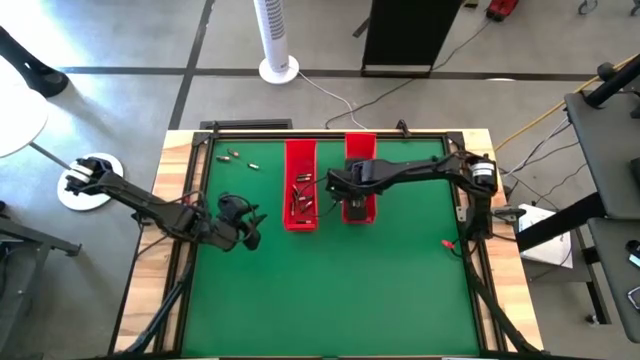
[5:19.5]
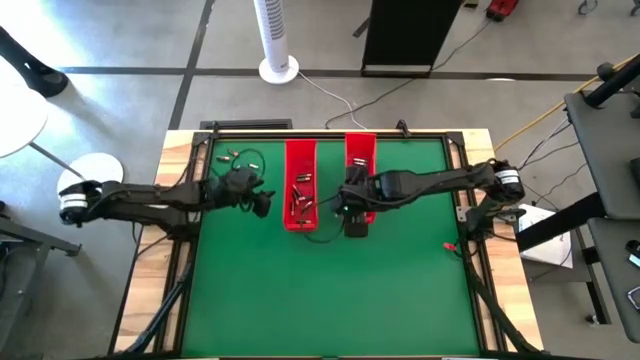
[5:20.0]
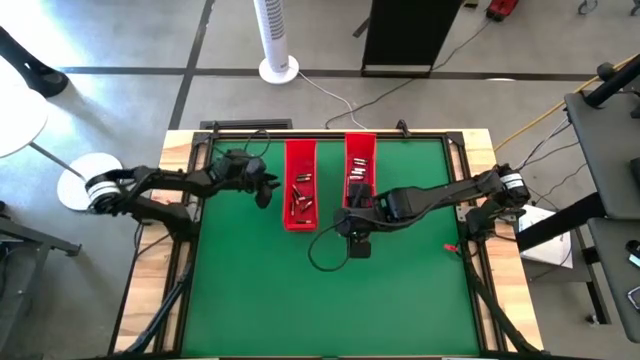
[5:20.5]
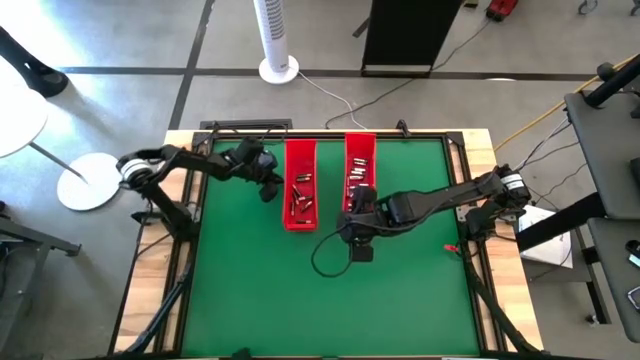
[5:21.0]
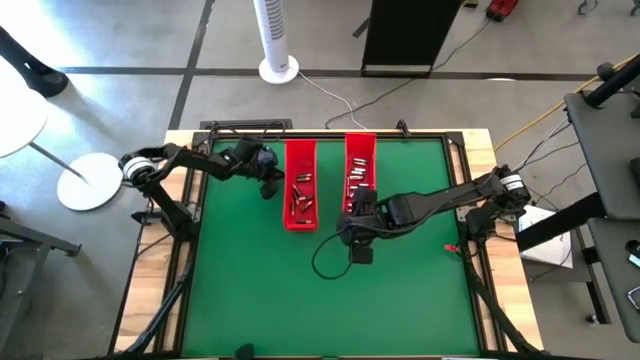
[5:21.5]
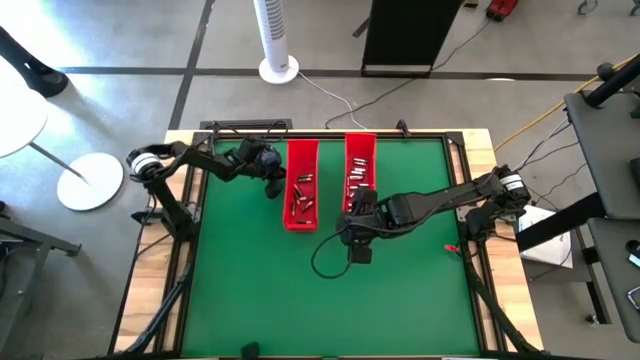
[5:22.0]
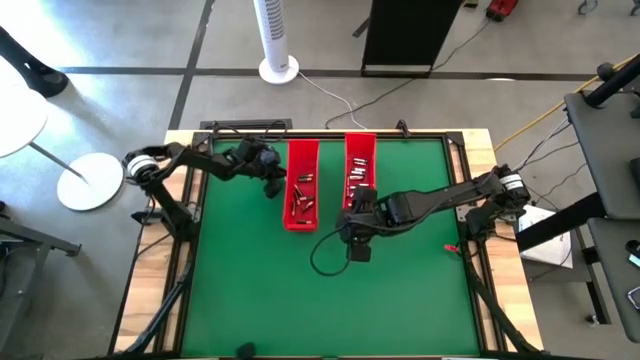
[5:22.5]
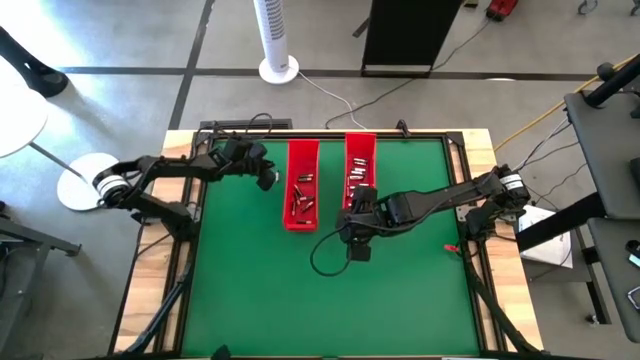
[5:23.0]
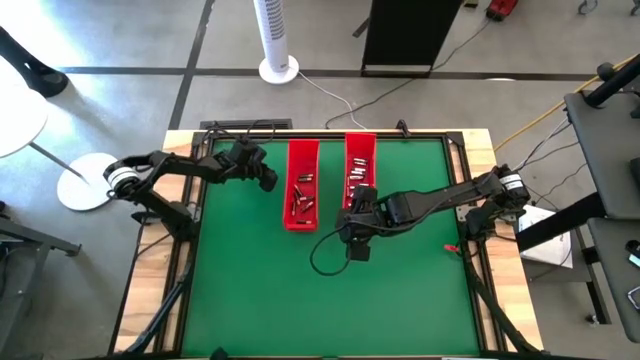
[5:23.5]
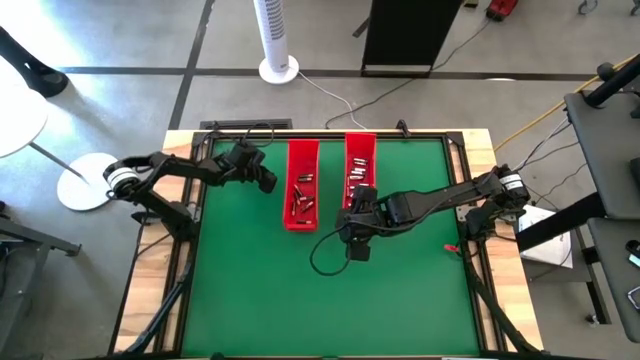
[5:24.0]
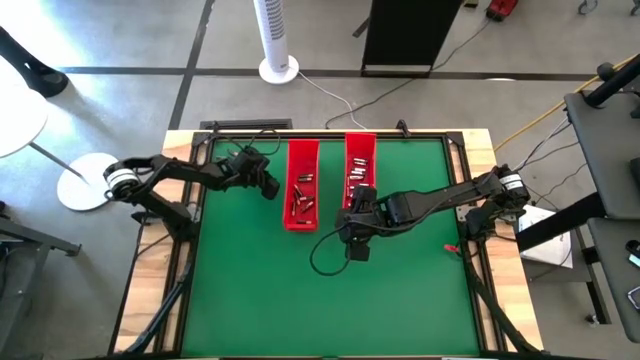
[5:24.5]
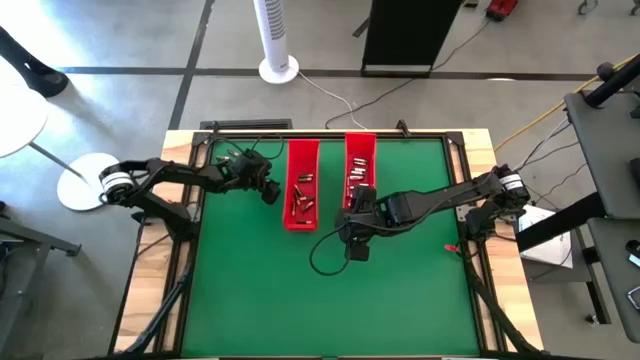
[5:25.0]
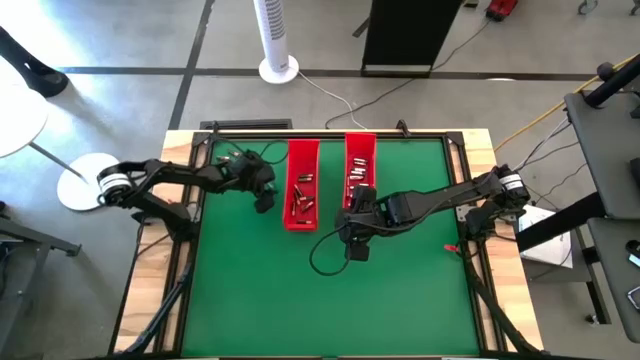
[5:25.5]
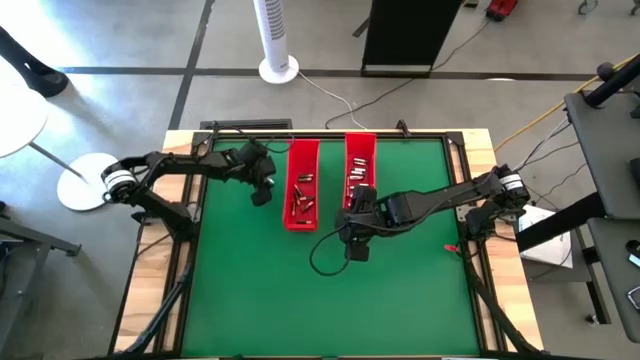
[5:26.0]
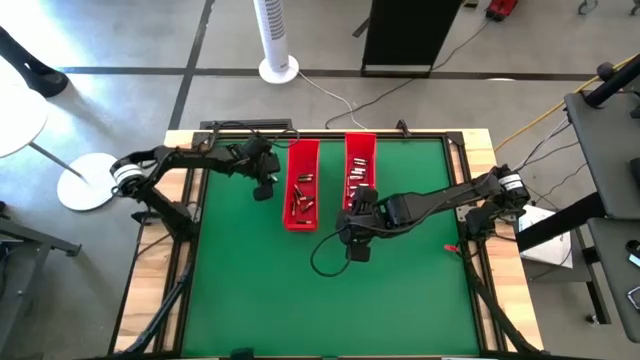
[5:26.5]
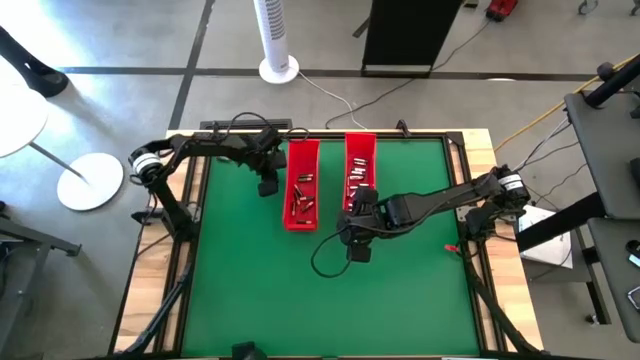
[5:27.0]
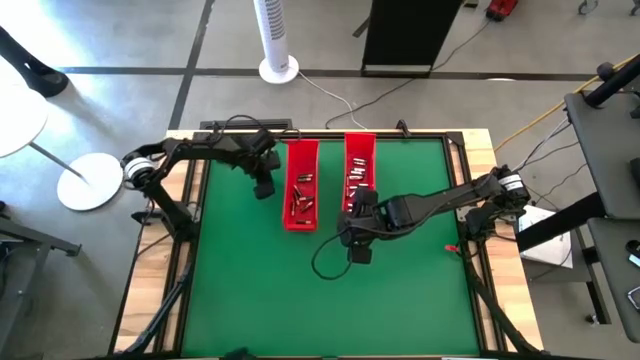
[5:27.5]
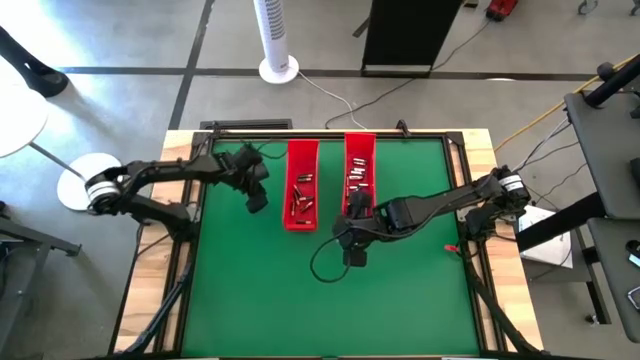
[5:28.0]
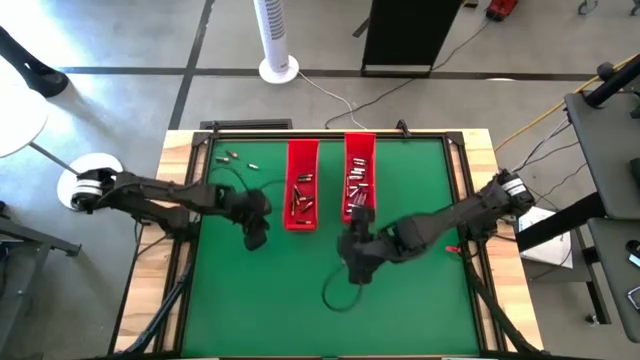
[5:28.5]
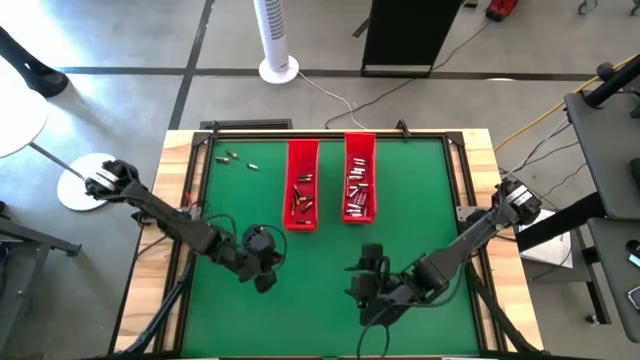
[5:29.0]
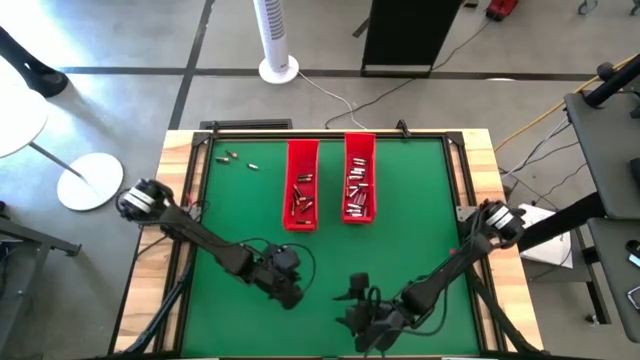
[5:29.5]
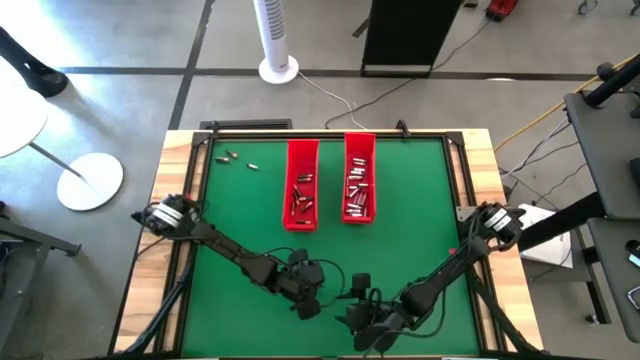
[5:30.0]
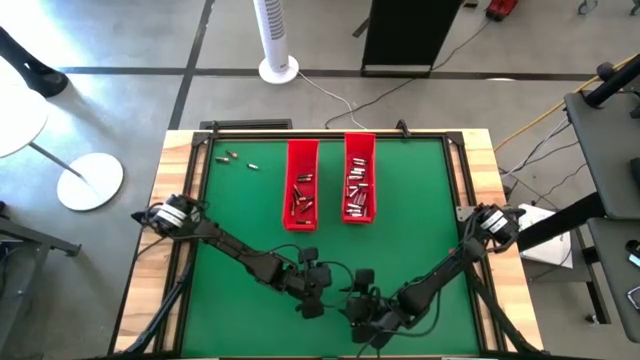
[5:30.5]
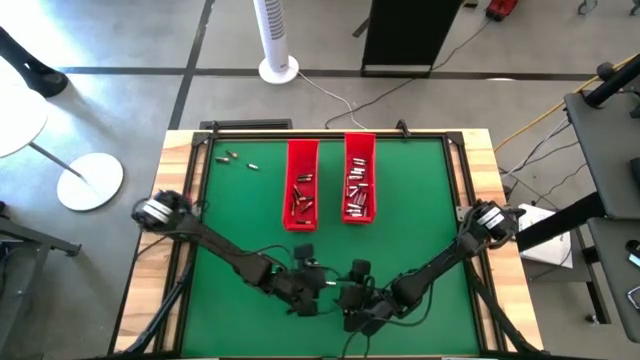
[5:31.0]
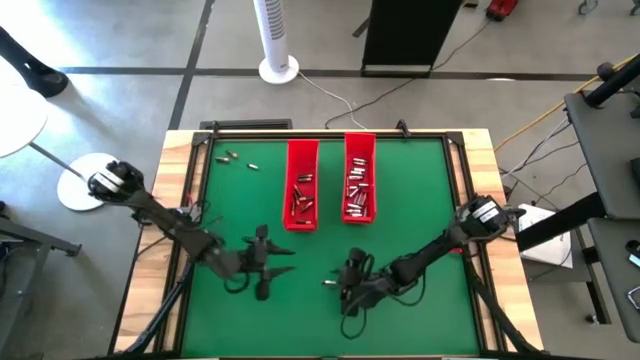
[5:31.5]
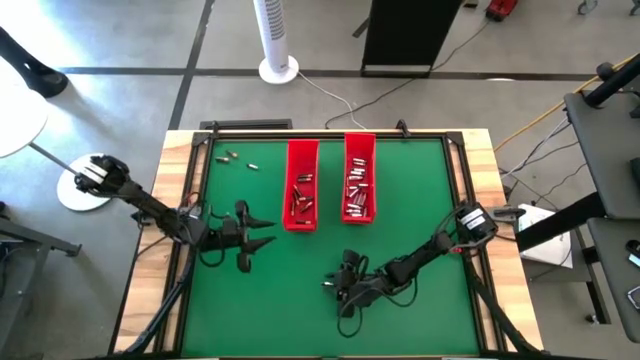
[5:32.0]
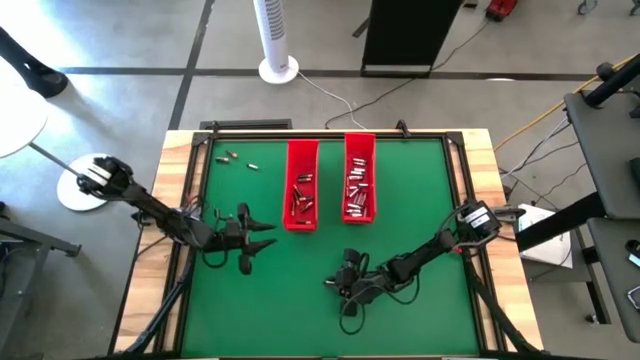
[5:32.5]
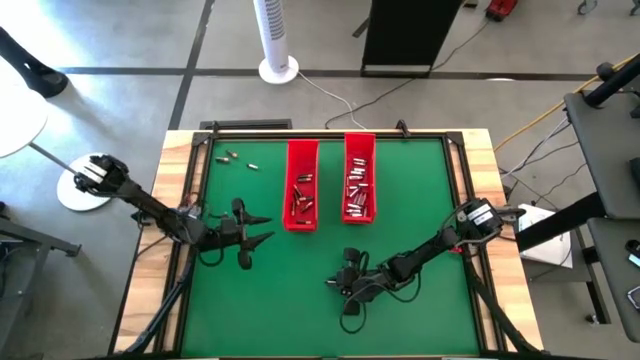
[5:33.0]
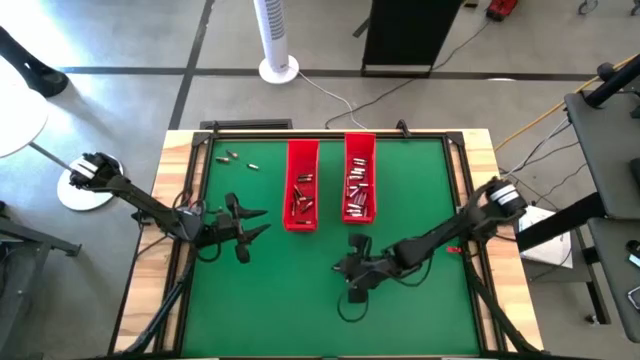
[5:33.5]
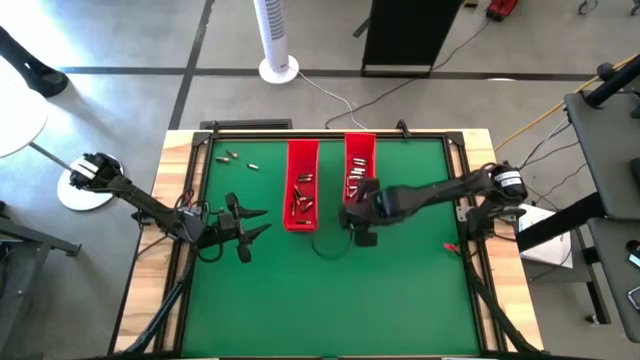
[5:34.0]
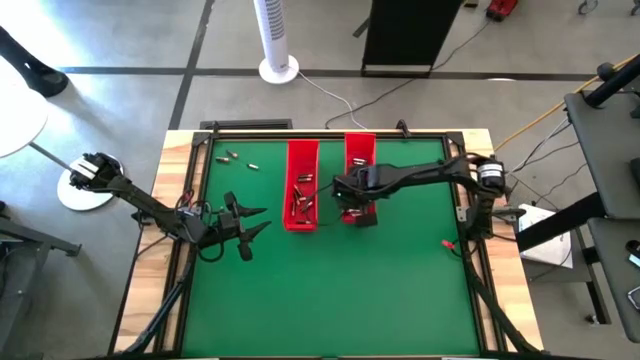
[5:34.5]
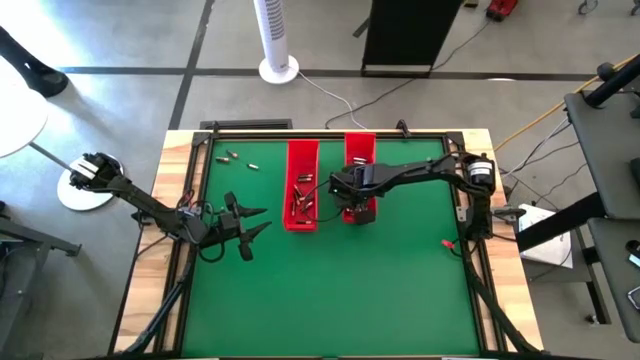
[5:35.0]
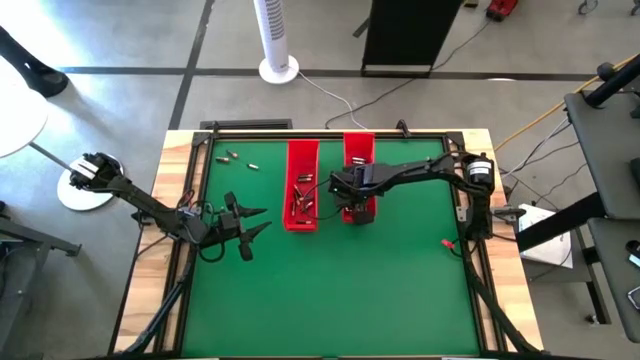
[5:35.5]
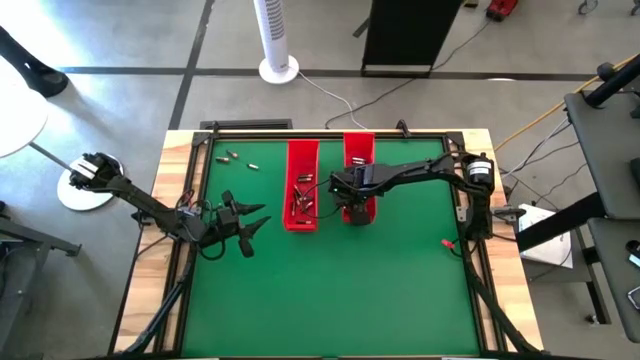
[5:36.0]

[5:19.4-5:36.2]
Task: Sort batteries
Put the silver battery into the right red bin

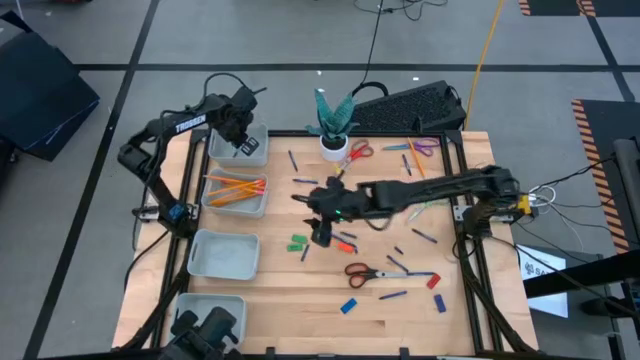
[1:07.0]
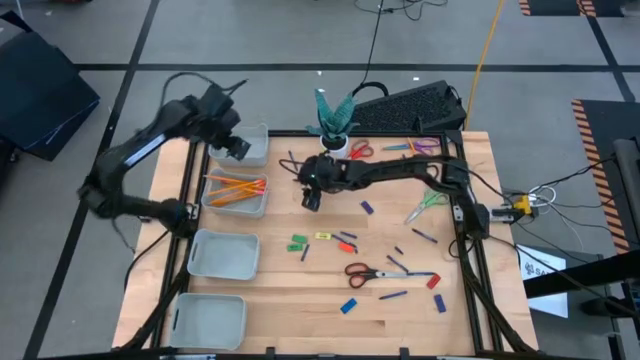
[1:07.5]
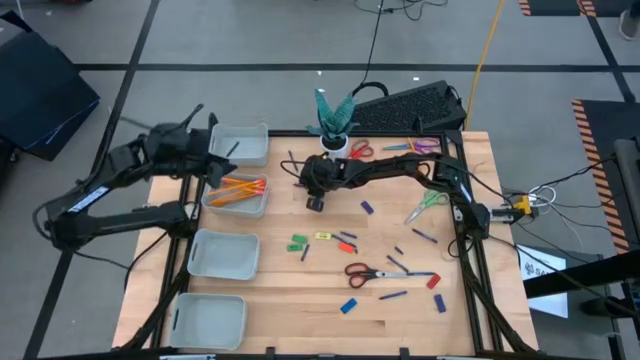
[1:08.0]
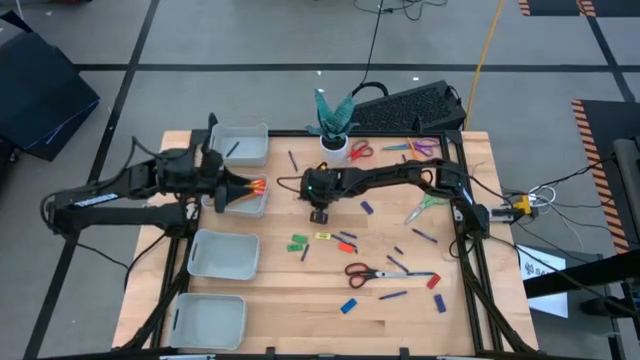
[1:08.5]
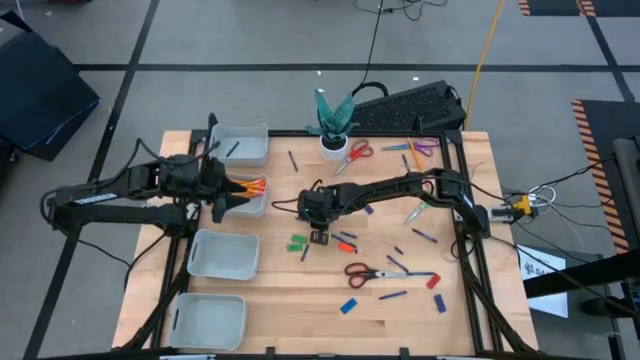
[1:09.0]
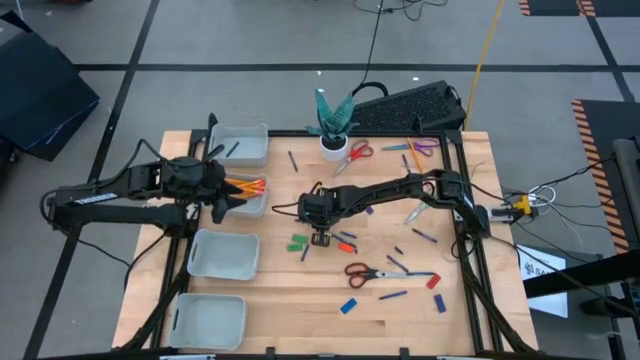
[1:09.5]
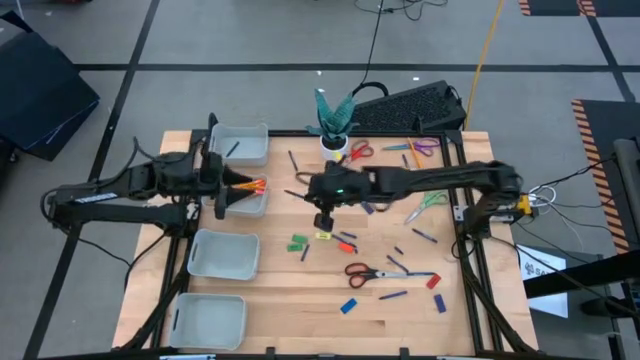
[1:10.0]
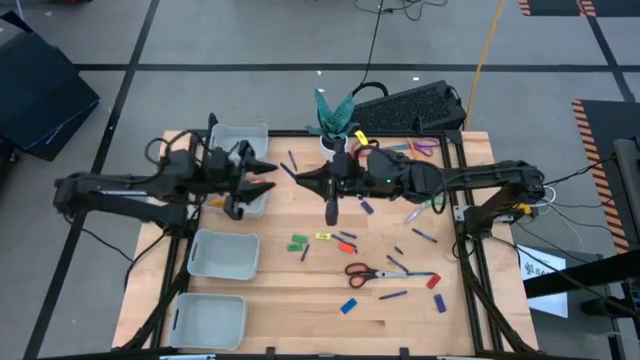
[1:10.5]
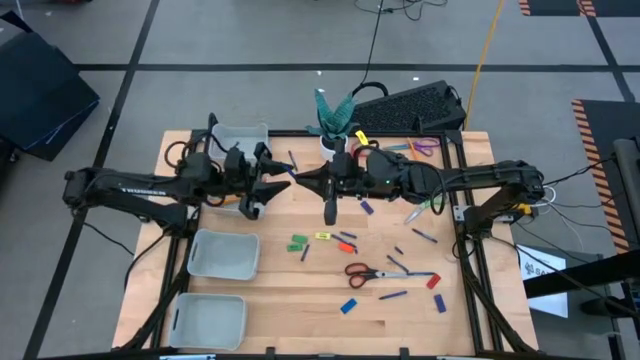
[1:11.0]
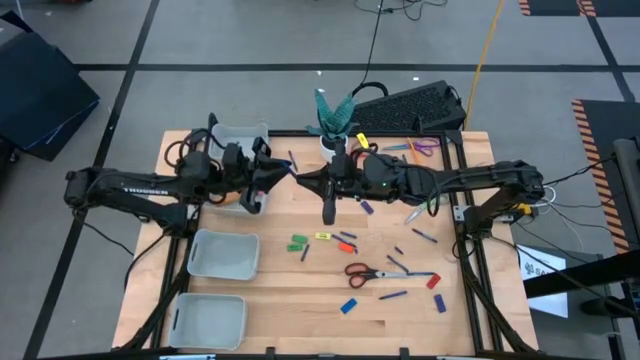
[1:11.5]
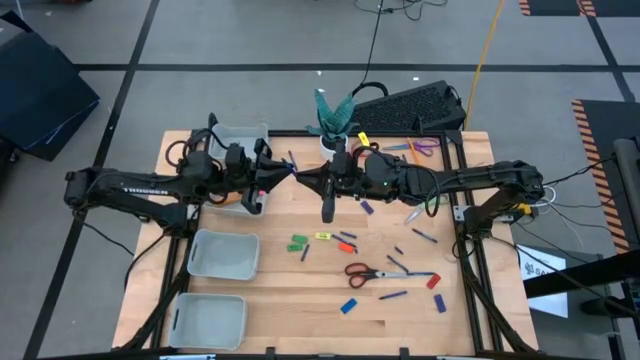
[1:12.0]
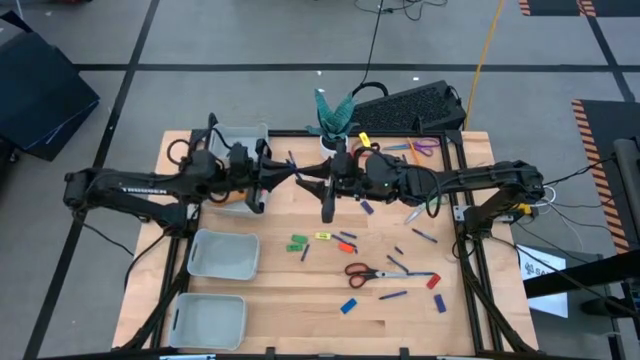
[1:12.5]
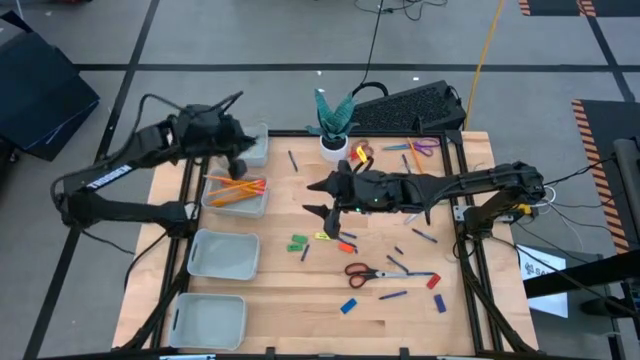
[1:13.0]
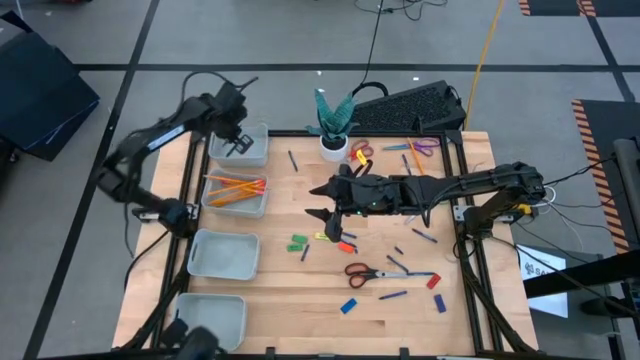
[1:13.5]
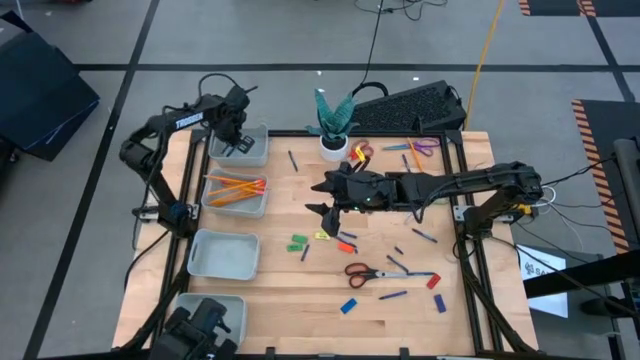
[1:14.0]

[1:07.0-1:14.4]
Task: Sort crayons/erasers/pens/pencils in bins
Put the blue crayon into the top gray bin
